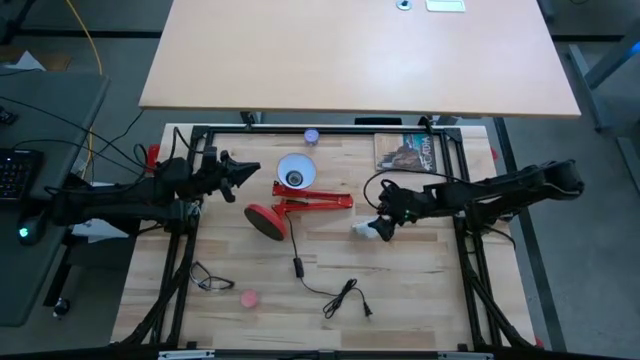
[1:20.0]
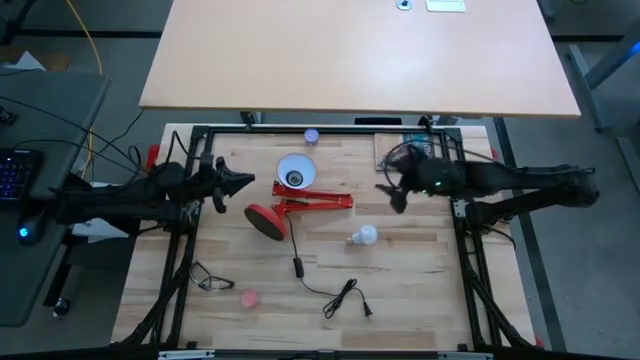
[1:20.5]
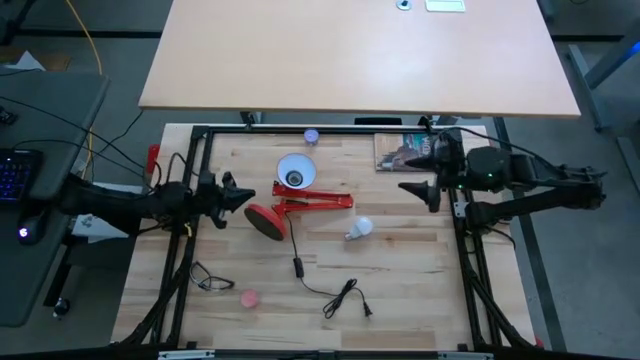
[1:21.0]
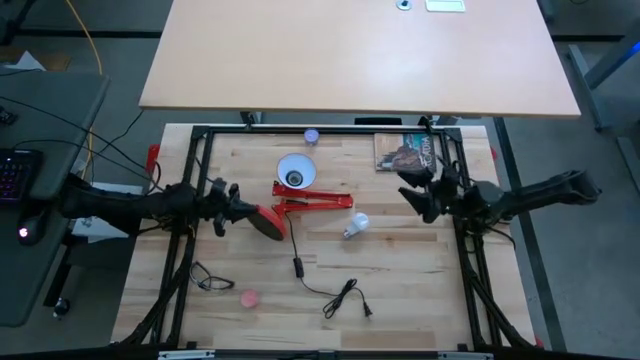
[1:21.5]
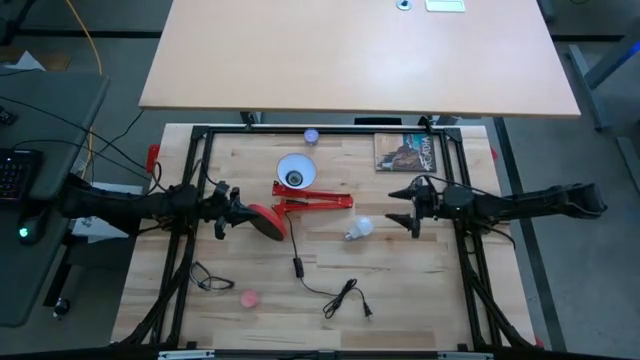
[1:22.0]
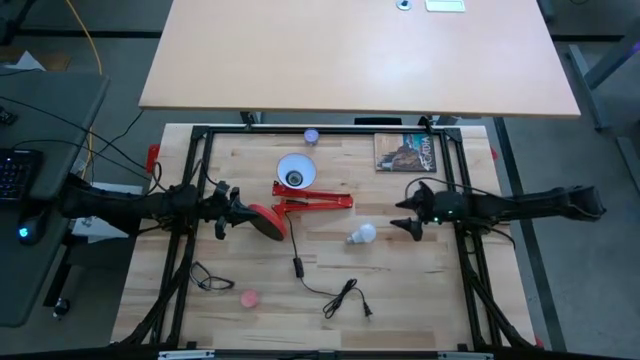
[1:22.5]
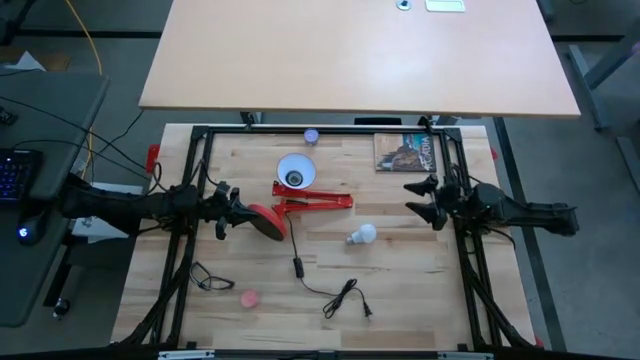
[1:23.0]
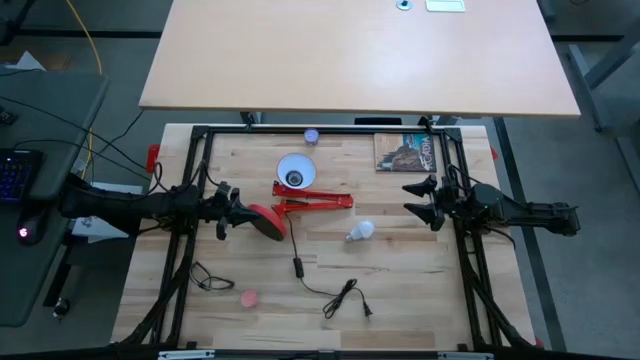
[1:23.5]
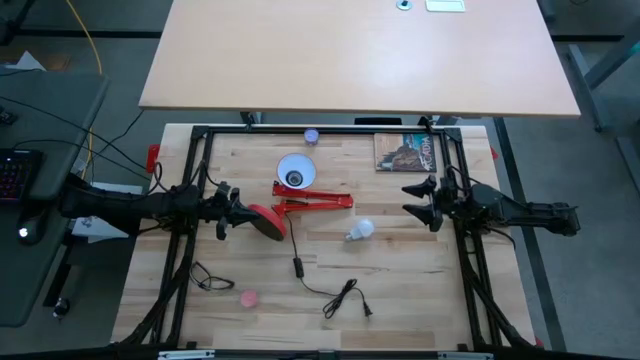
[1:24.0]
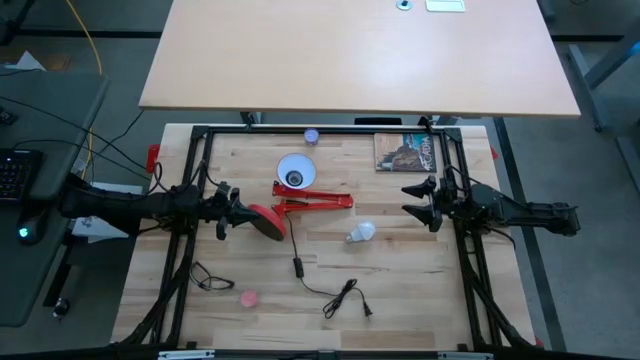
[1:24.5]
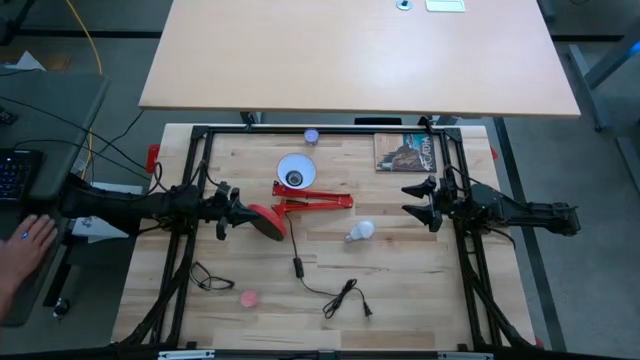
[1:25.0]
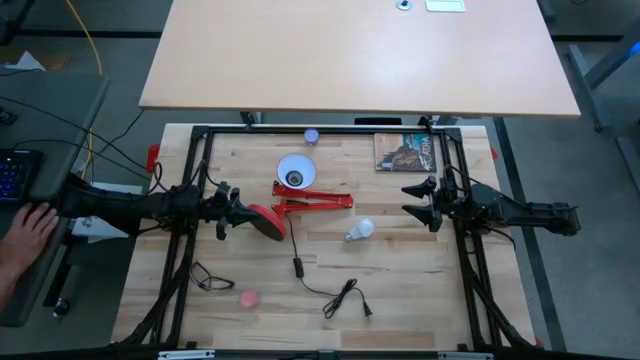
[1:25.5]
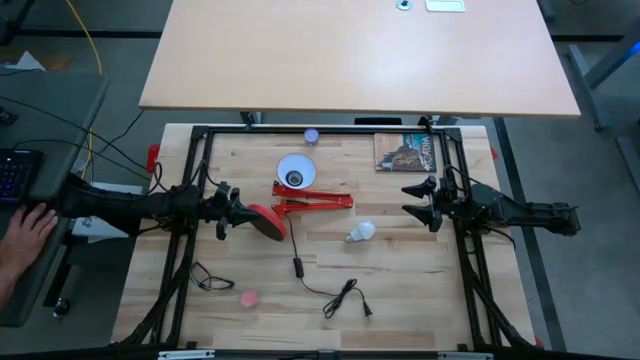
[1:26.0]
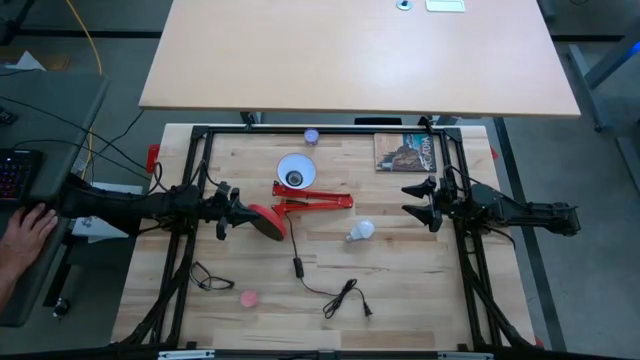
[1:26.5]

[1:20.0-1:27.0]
Task: Screw lightbulb
Return to Home Position

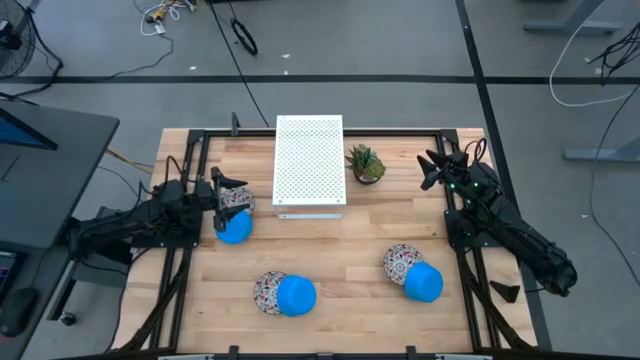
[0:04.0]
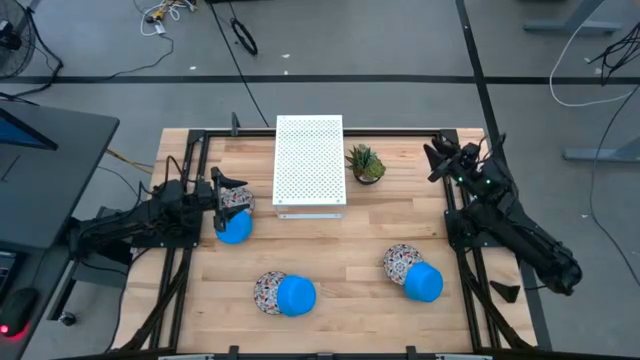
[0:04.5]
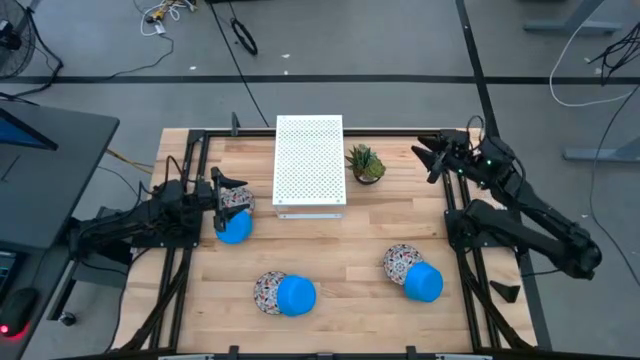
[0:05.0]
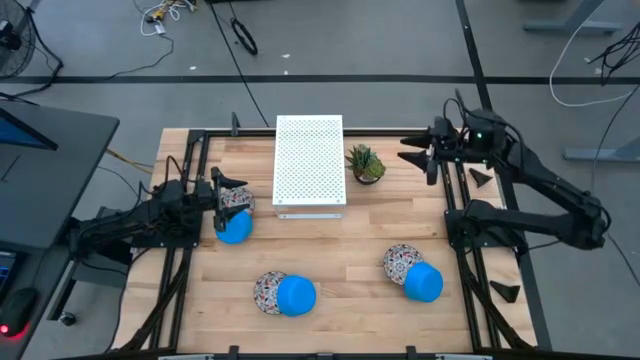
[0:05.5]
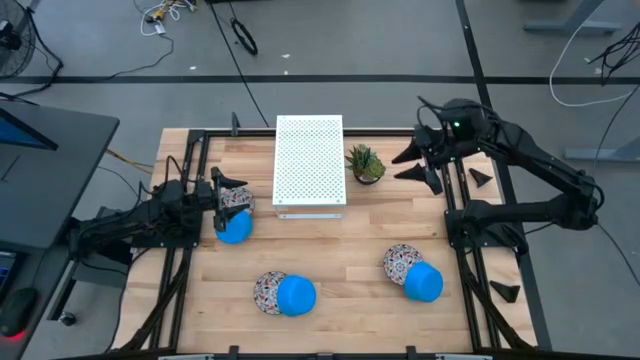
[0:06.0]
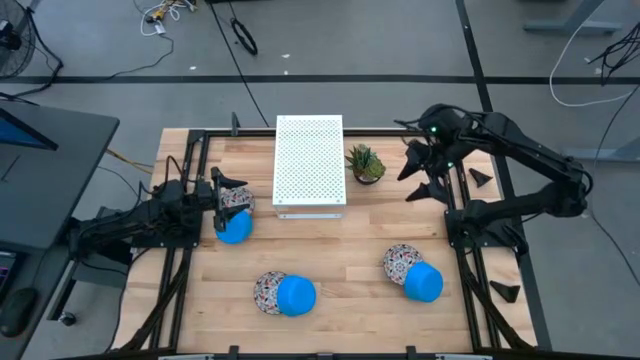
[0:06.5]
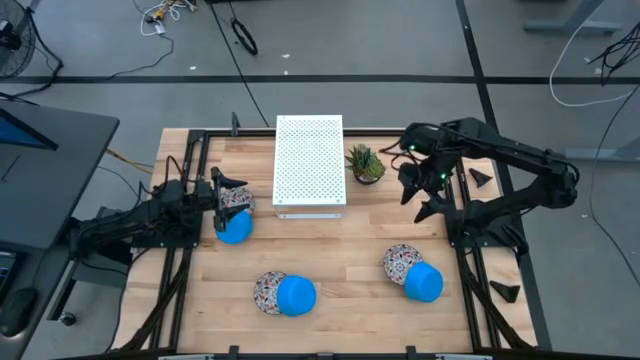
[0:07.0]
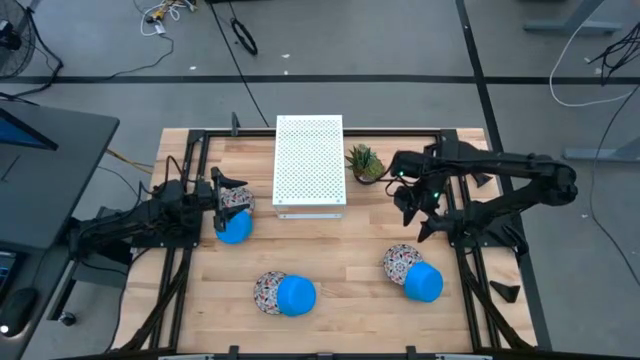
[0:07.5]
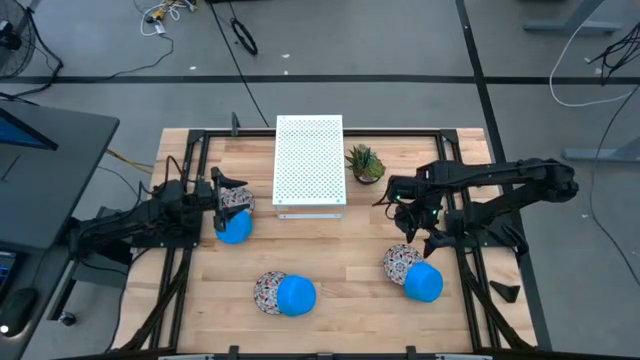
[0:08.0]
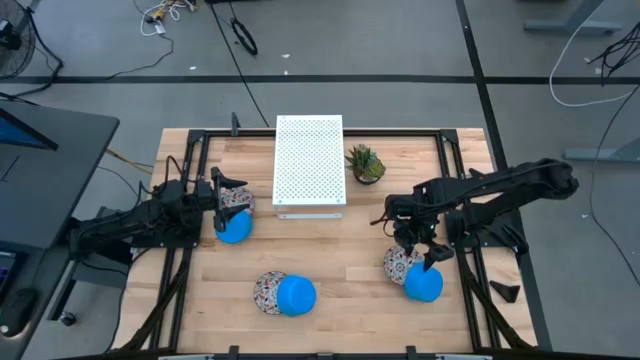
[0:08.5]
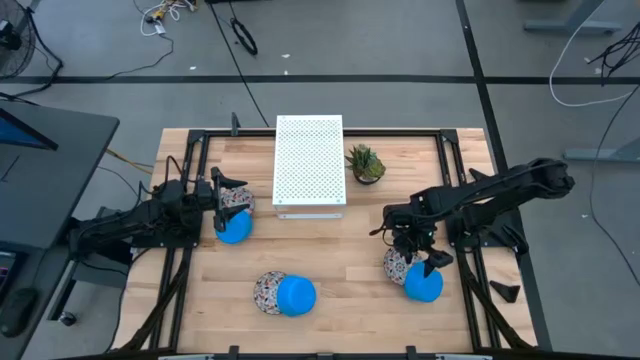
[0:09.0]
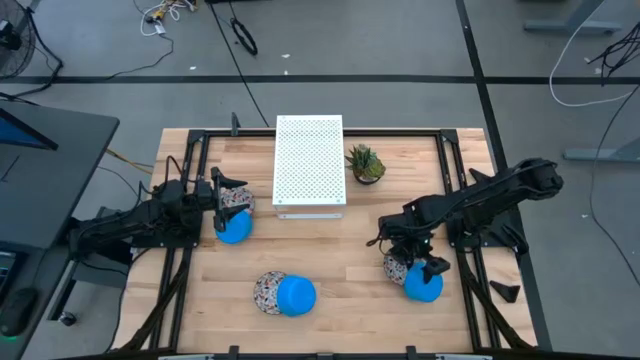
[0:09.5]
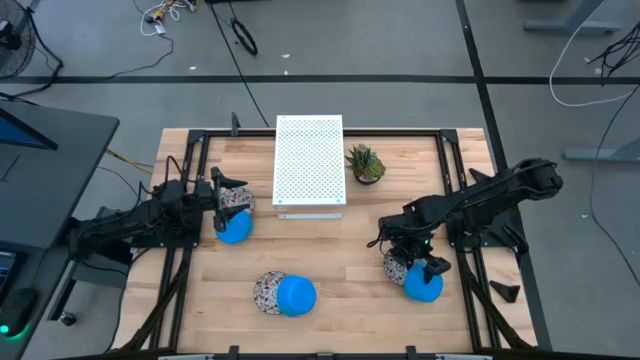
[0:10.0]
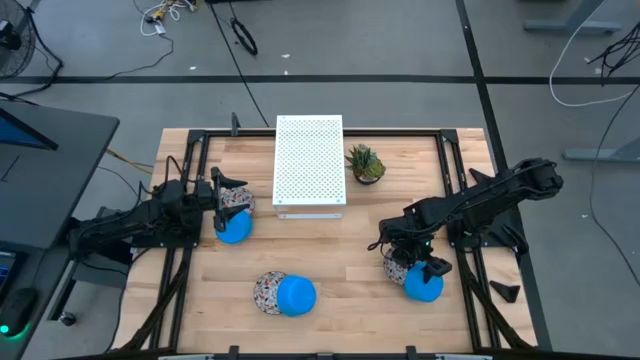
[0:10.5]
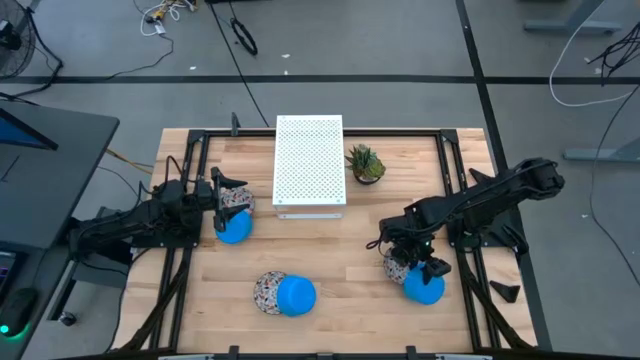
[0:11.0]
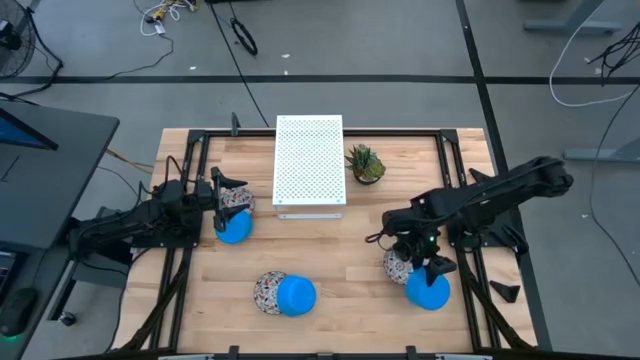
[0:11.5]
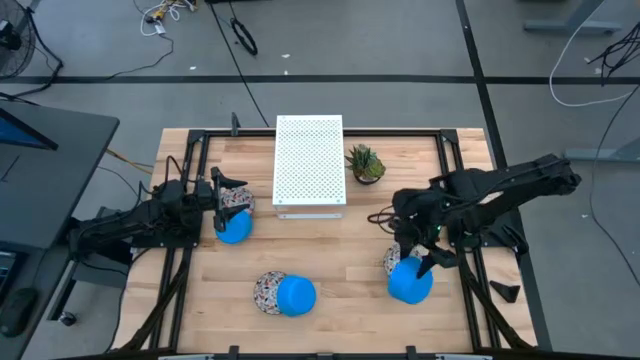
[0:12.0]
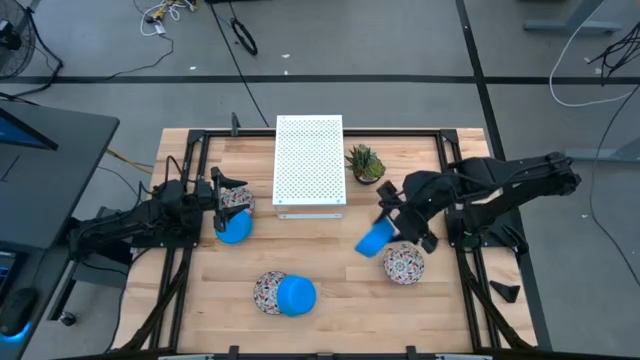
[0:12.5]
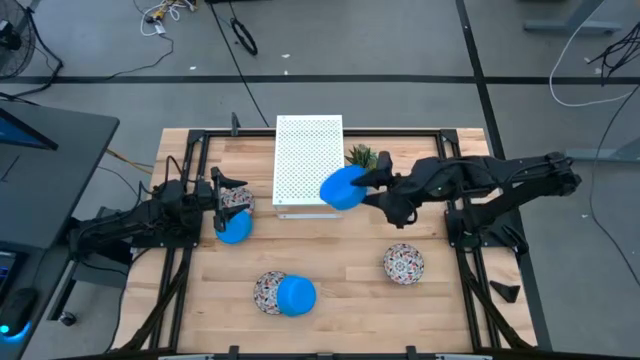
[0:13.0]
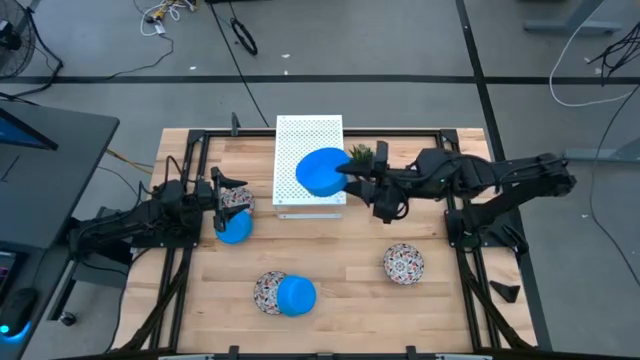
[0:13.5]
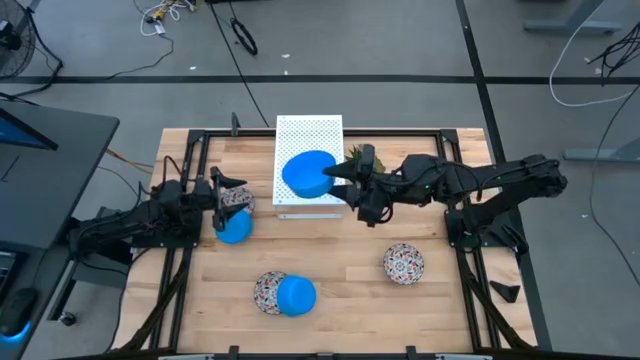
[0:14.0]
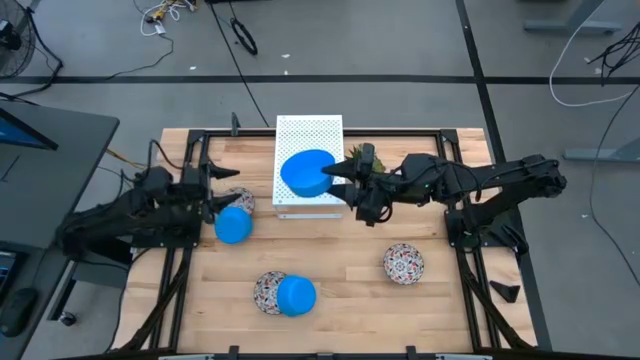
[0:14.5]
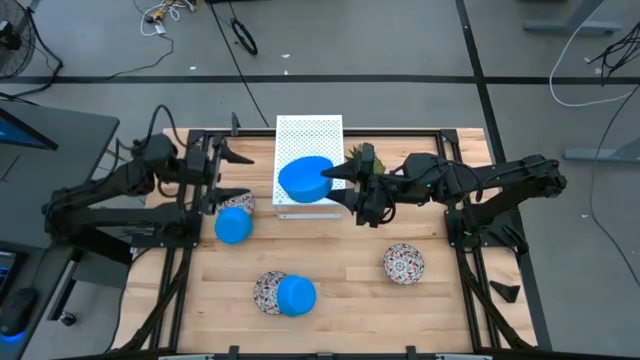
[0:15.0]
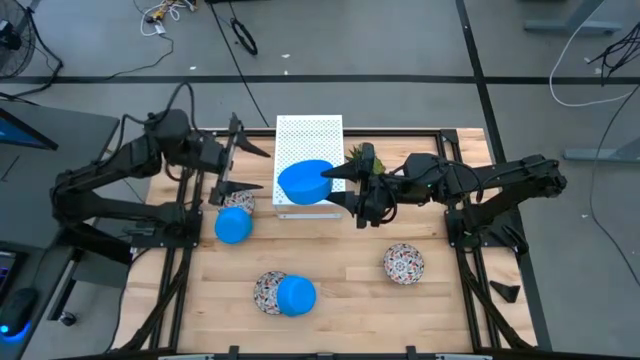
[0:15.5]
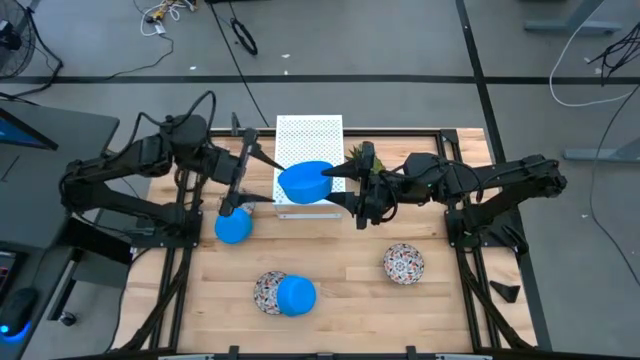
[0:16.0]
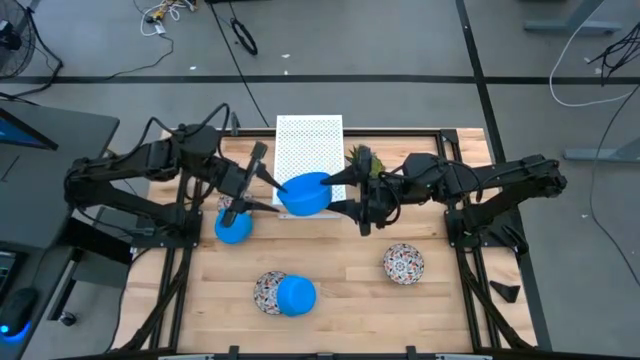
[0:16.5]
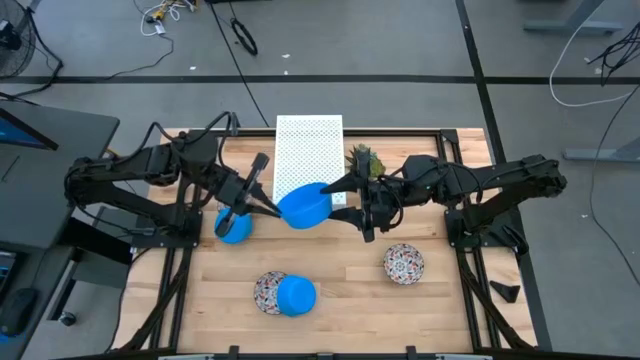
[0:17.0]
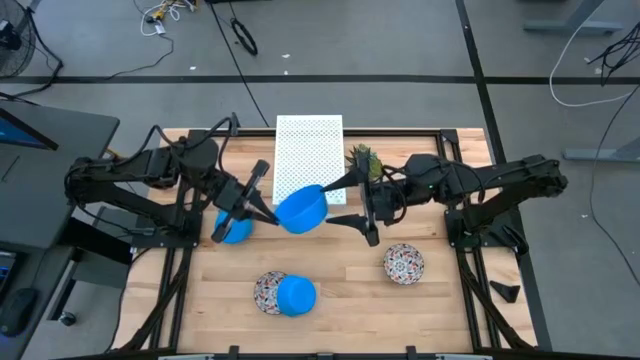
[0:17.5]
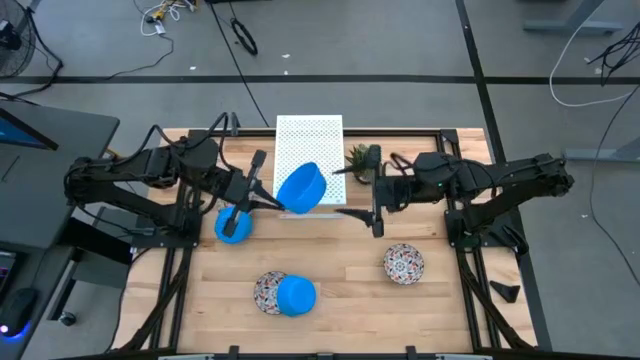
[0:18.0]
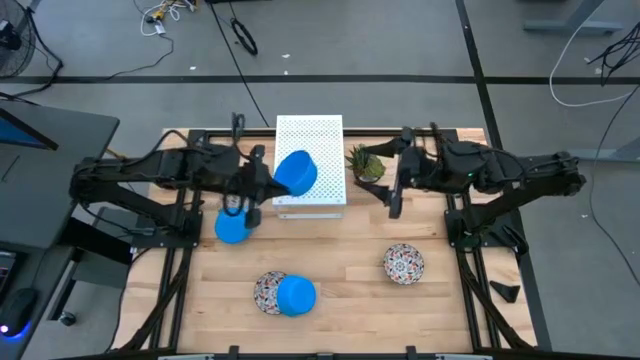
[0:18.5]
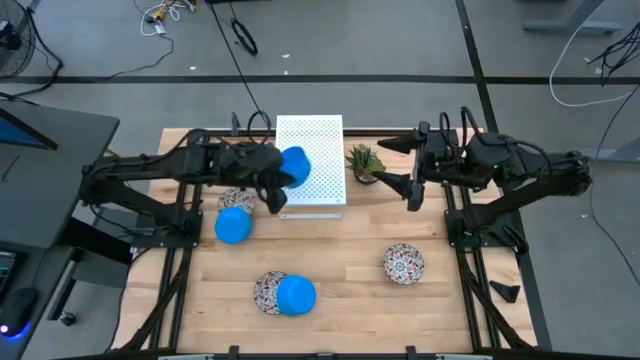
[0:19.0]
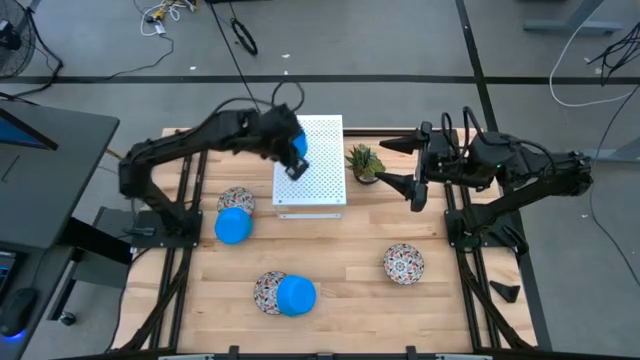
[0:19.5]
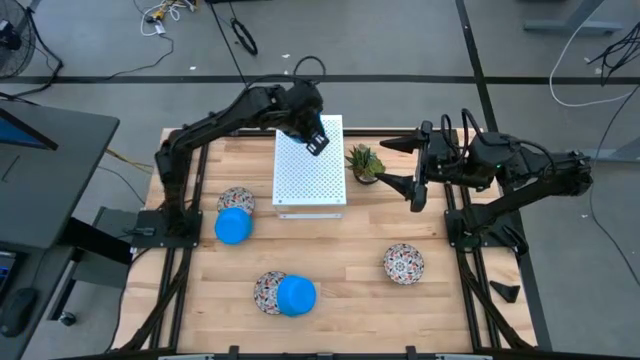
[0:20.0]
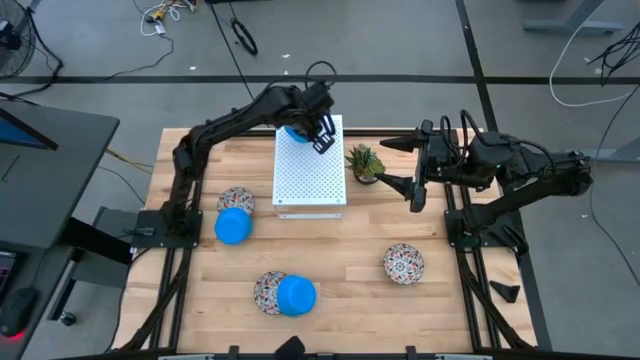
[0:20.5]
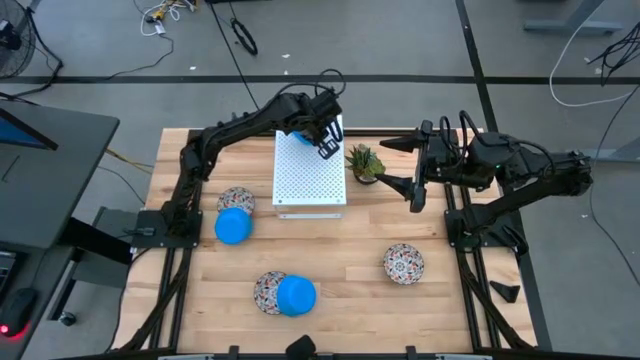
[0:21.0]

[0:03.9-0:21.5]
Task: Pick & Place Mini bowls
Put the bottom right blue bowl on the shelf
